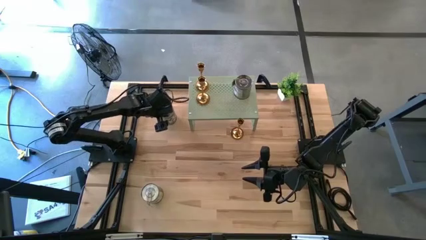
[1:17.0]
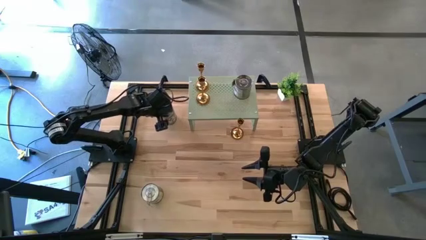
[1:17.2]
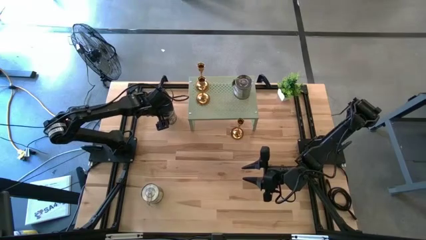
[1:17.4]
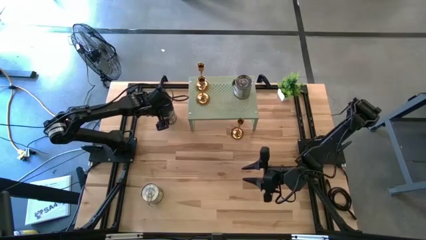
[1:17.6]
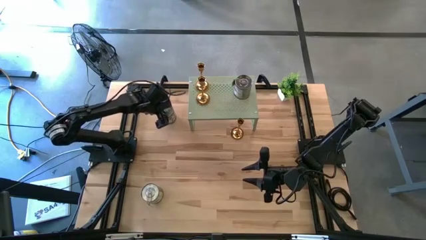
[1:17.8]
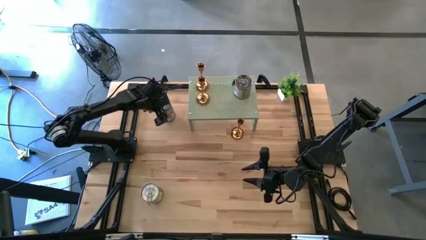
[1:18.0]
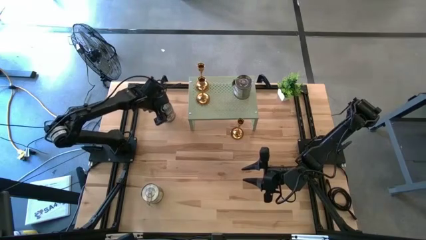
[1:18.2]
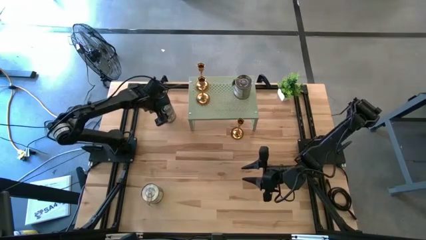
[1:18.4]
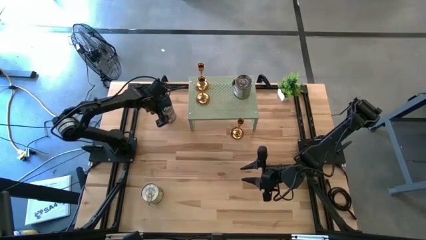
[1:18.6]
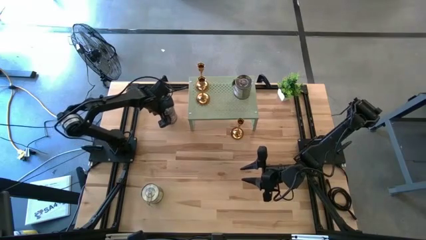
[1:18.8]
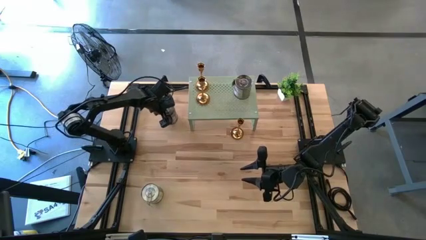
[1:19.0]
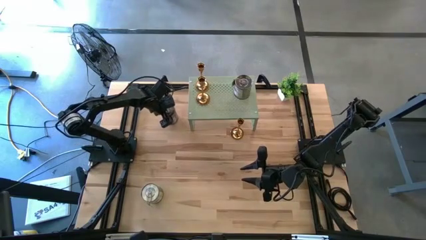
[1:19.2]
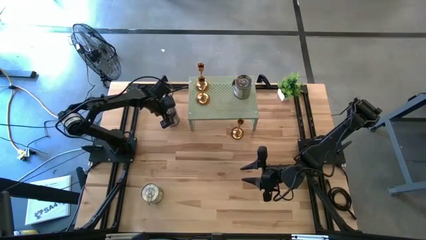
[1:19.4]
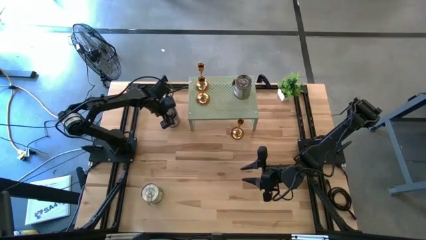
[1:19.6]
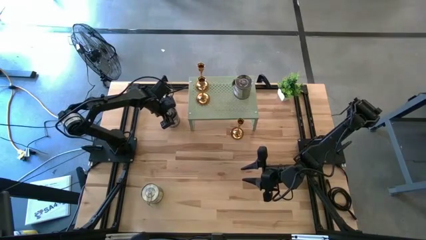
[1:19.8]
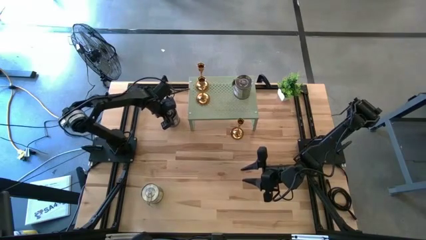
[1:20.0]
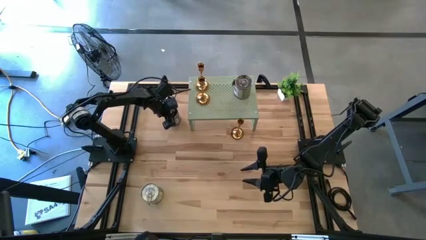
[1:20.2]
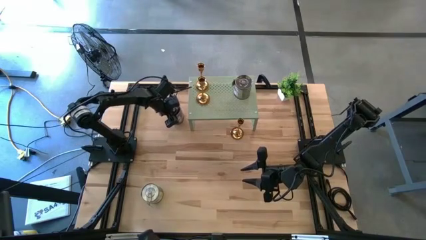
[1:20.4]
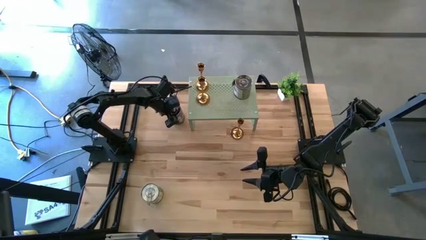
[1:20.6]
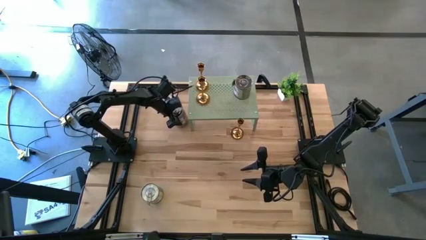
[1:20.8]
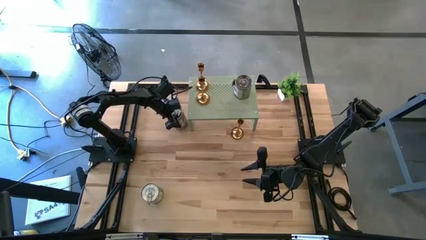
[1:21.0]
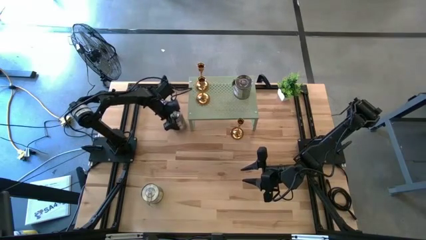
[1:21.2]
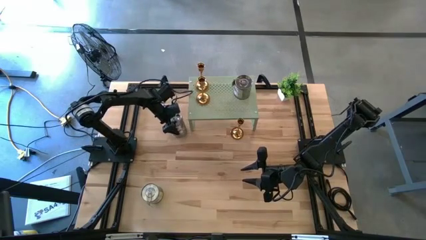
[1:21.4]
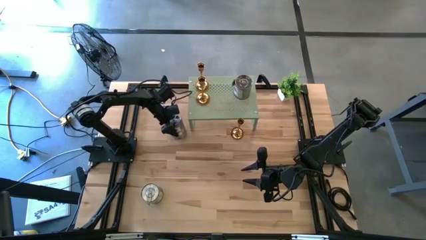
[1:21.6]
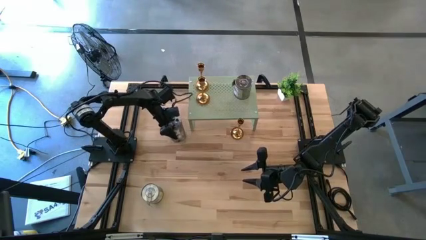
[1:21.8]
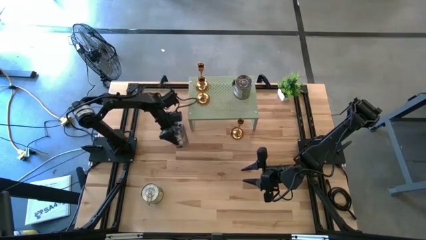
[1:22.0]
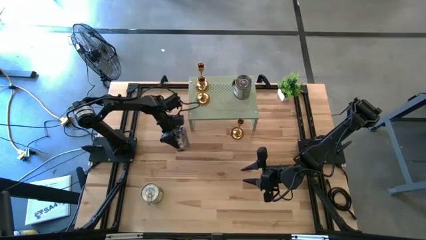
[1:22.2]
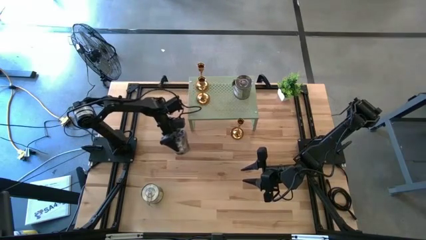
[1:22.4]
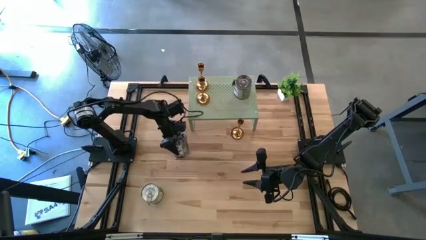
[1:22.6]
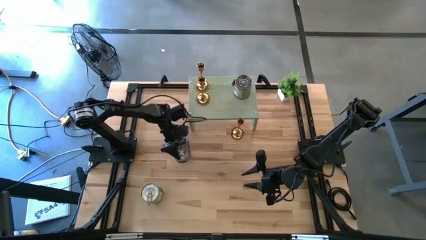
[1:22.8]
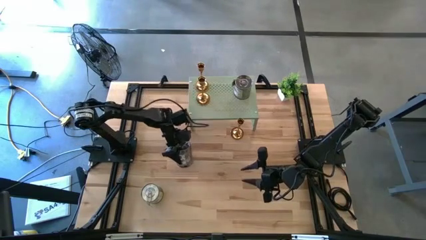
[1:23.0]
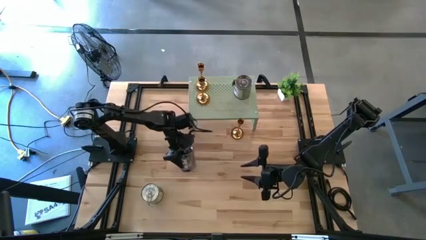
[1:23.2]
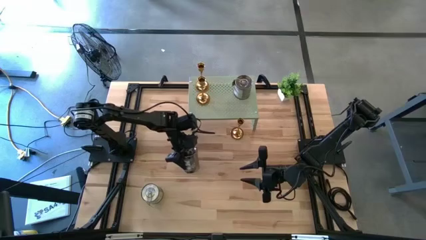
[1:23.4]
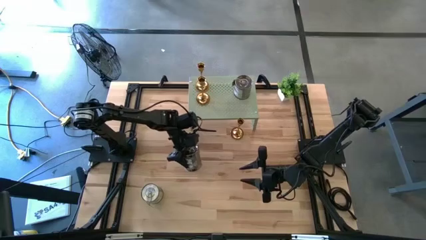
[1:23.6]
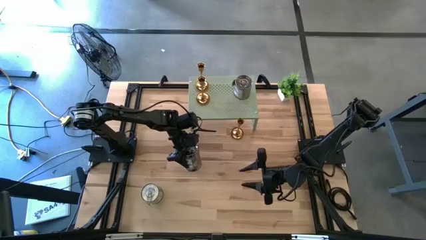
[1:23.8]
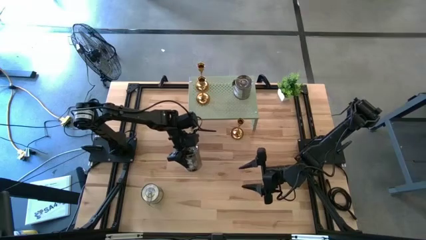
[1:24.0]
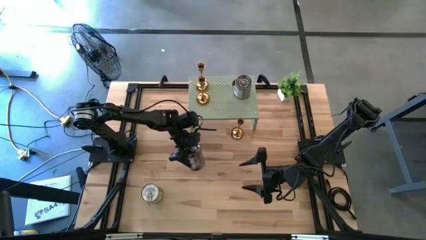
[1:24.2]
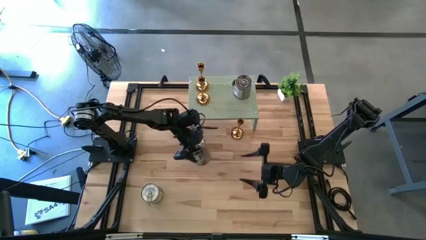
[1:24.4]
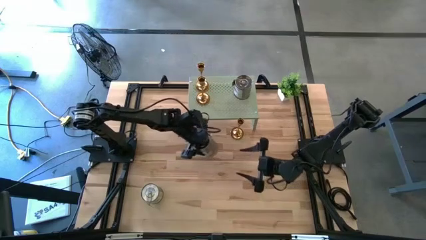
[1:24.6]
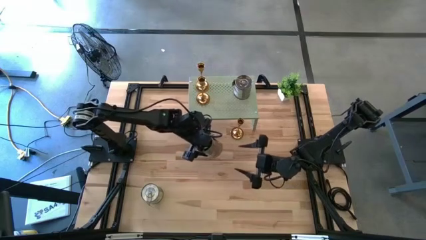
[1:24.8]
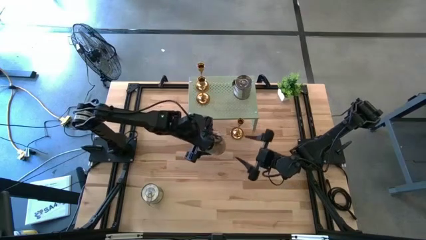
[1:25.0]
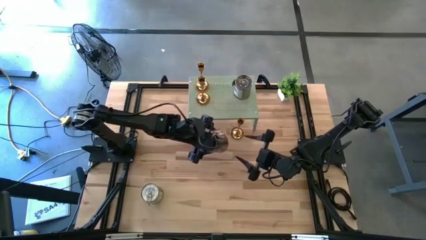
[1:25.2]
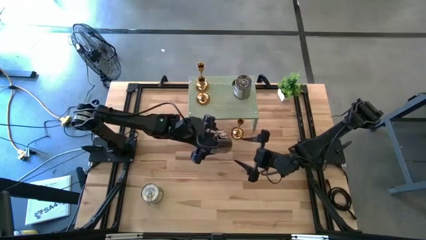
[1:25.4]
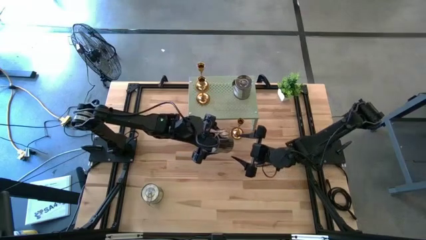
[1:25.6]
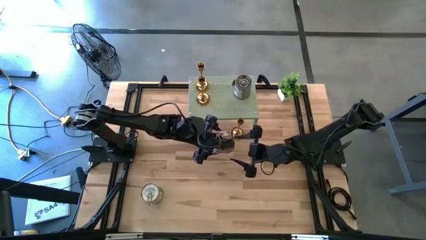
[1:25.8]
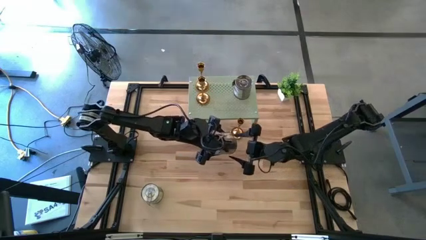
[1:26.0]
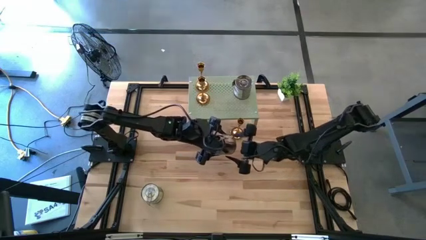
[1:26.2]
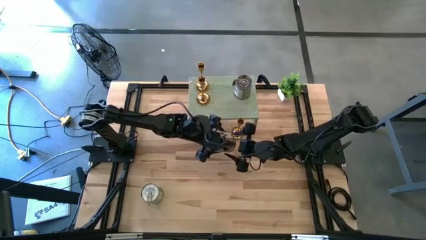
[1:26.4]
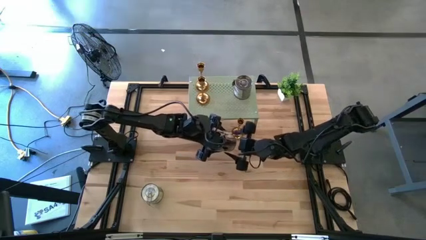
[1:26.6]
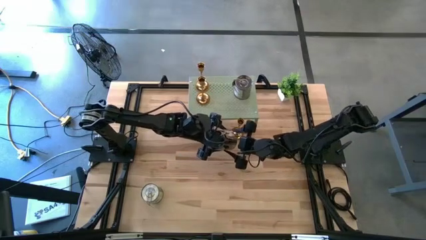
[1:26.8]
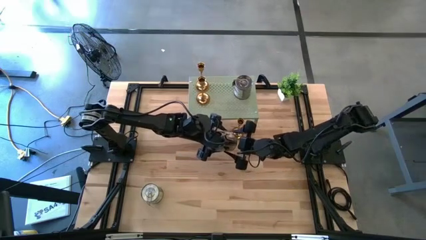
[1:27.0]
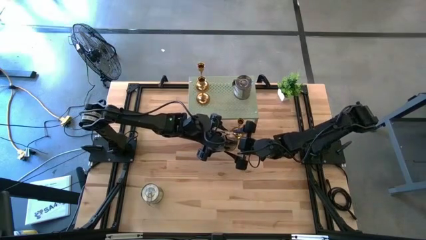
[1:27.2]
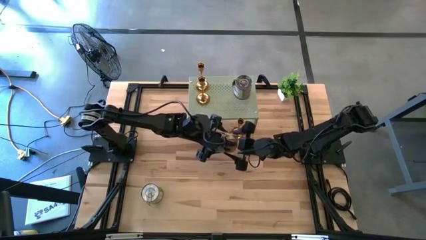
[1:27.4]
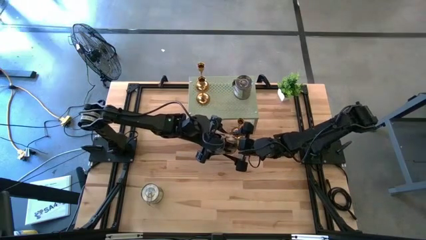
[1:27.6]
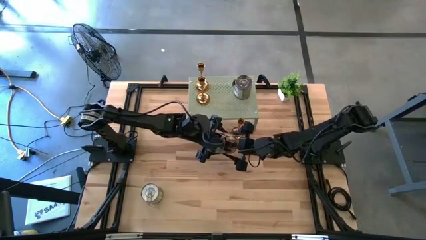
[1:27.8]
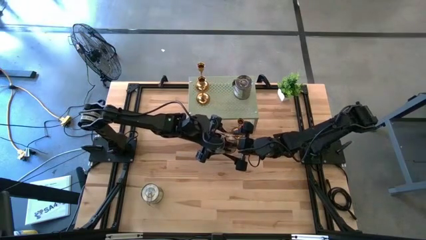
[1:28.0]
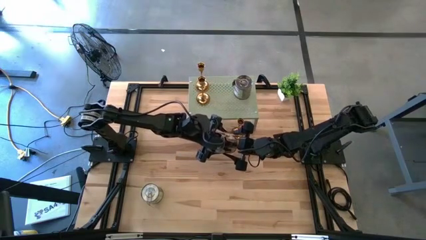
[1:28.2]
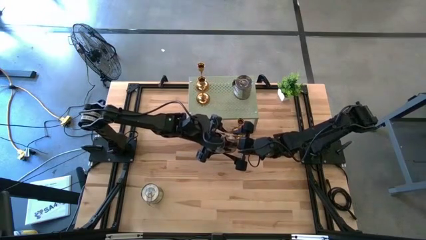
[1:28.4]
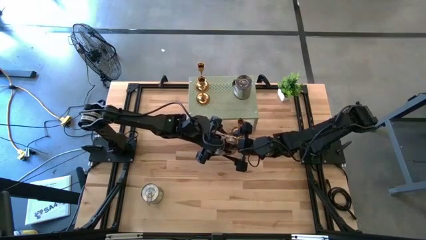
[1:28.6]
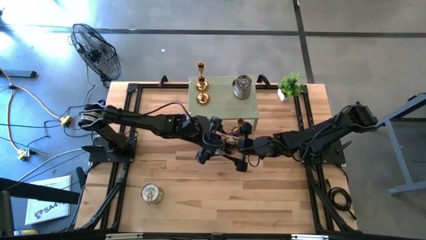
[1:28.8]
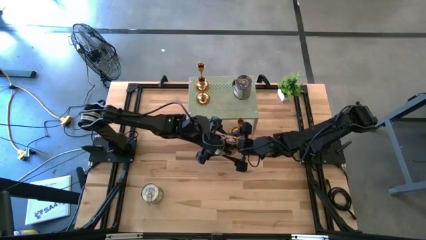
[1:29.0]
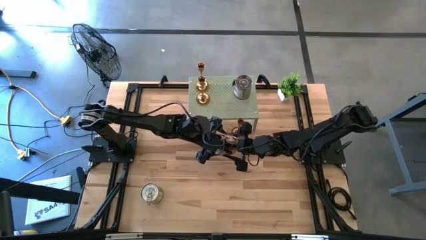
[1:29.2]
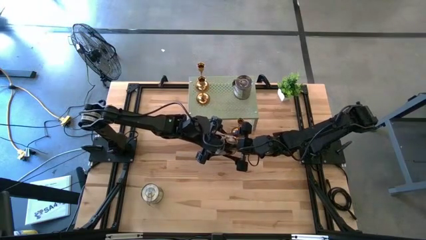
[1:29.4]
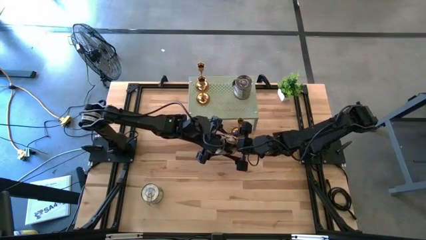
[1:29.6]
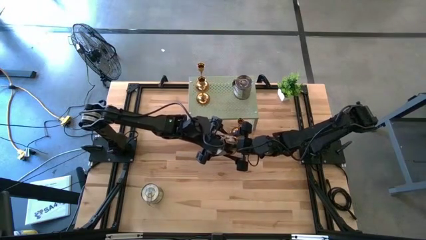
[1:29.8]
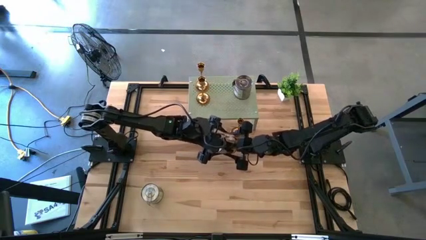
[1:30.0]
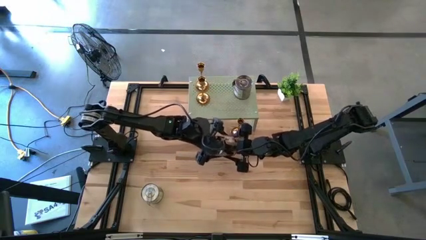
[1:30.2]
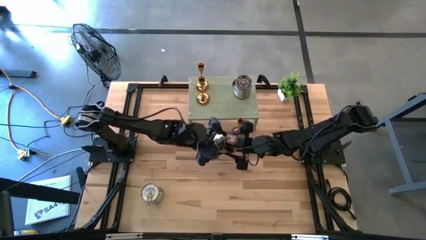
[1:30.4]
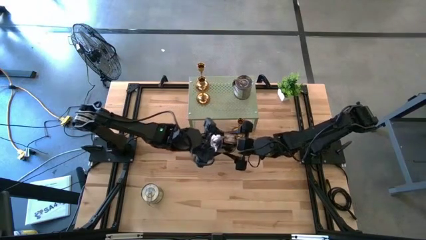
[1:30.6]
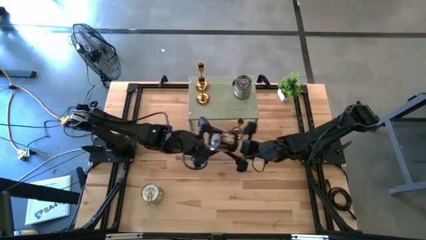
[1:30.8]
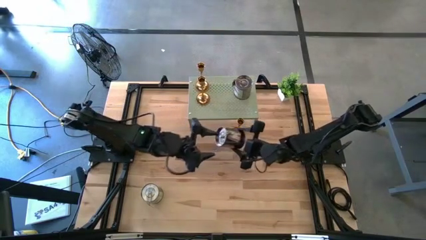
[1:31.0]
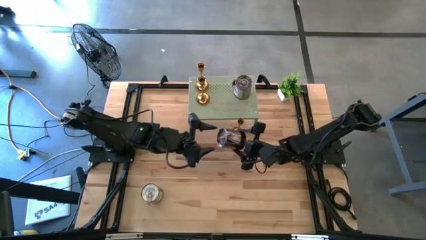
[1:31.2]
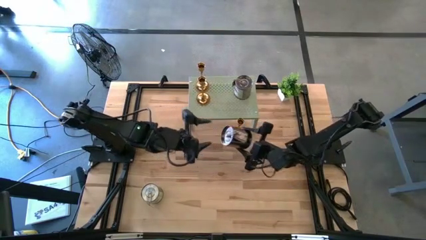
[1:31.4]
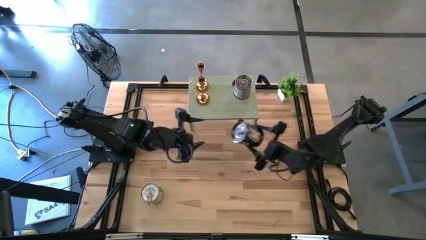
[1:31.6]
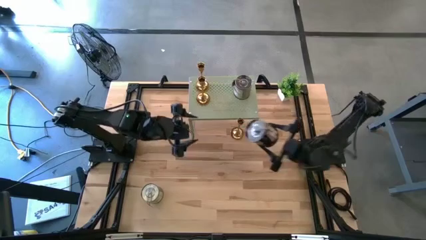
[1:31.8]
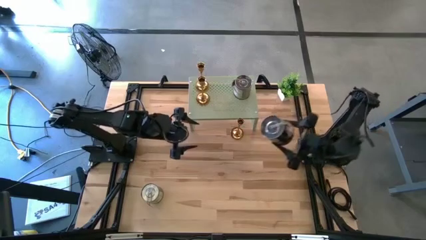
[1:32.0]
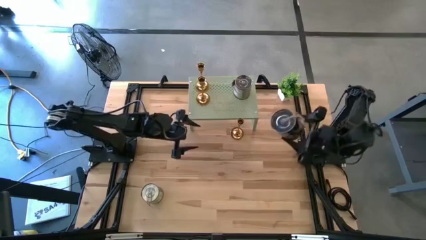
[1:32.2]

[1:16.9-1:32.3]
Task: Pick & Place candle stick holders
Put the top silver scented candle on the shelf aligned with the other silver scented candle
